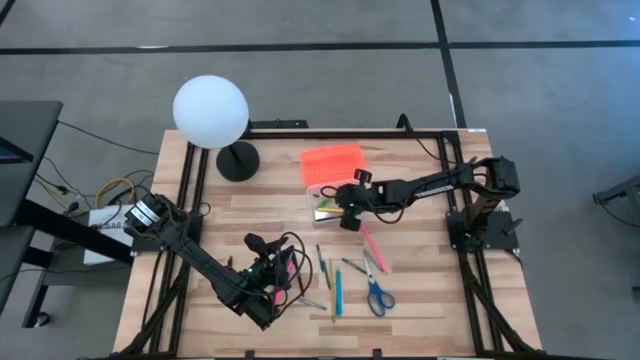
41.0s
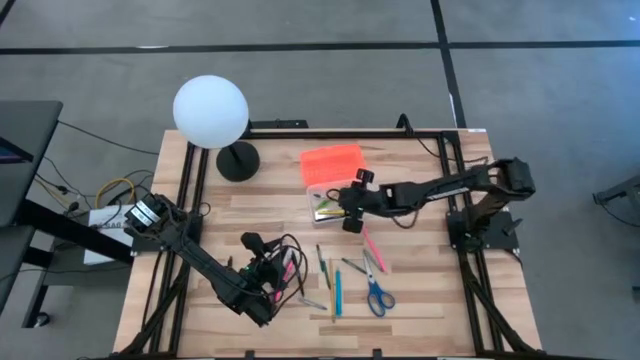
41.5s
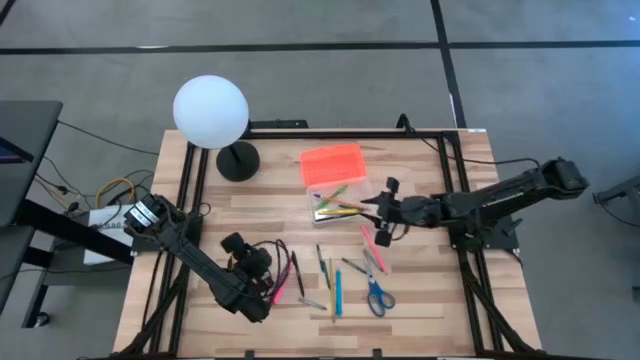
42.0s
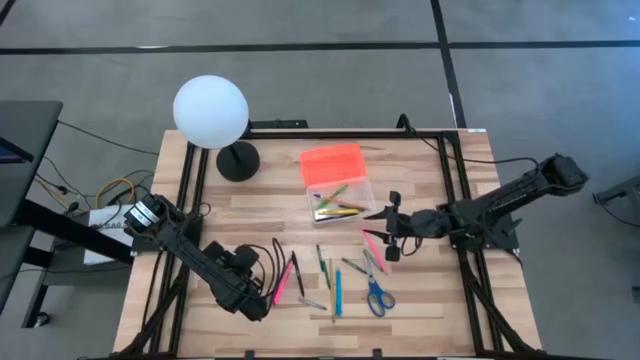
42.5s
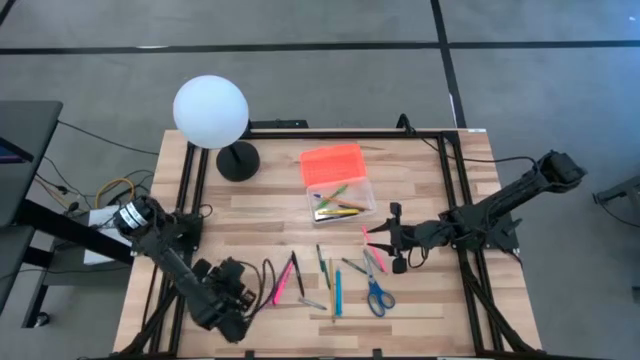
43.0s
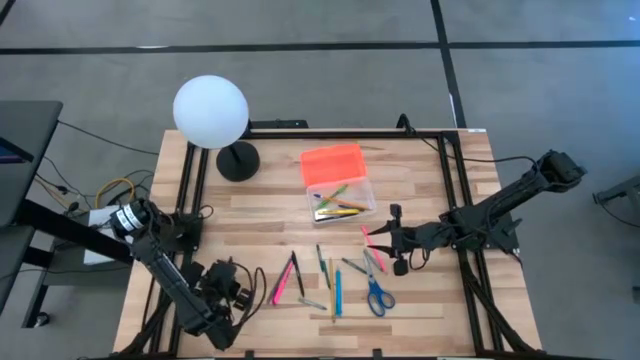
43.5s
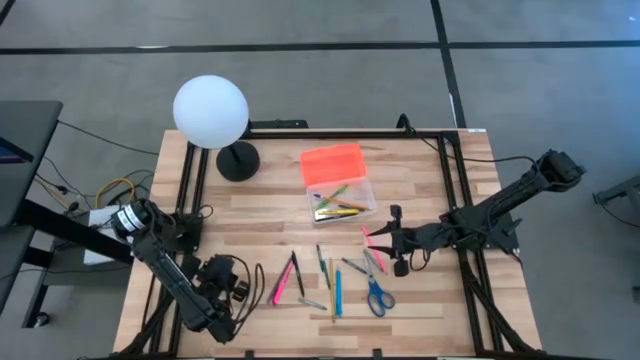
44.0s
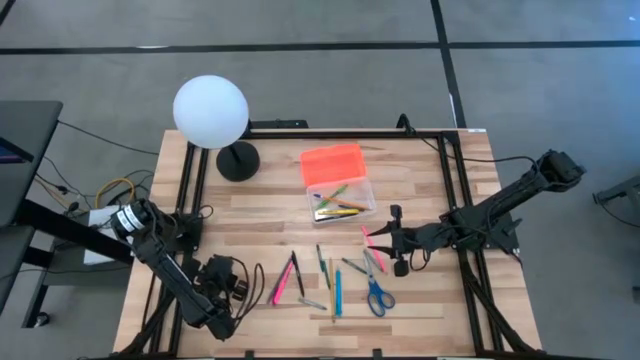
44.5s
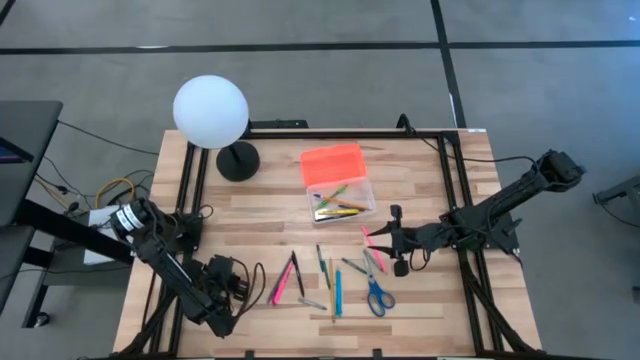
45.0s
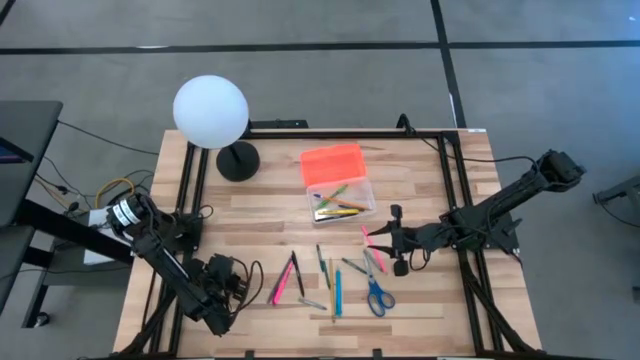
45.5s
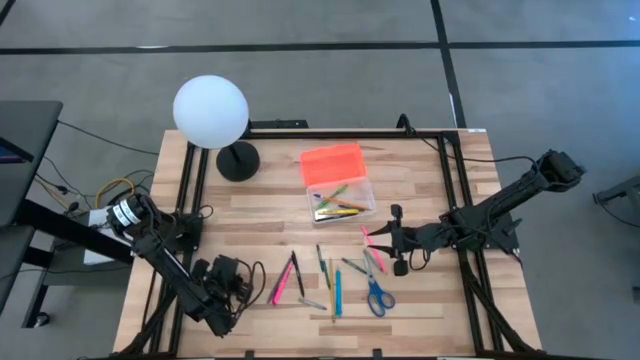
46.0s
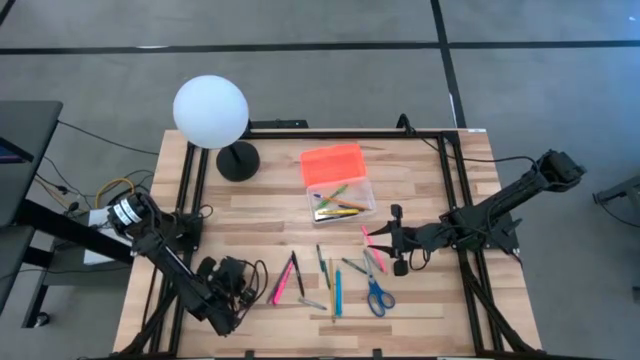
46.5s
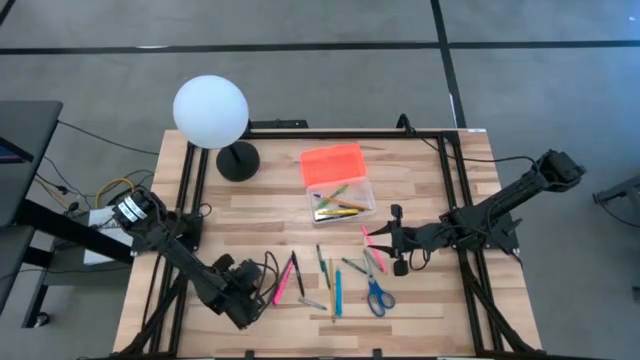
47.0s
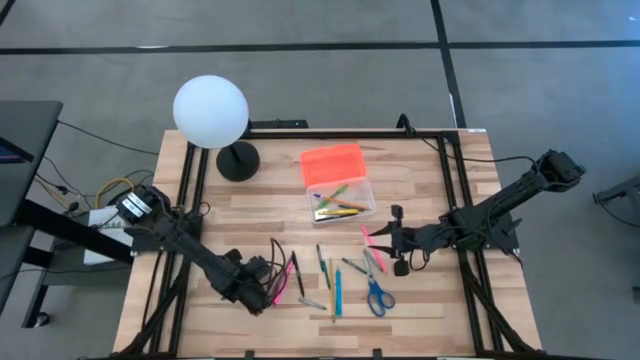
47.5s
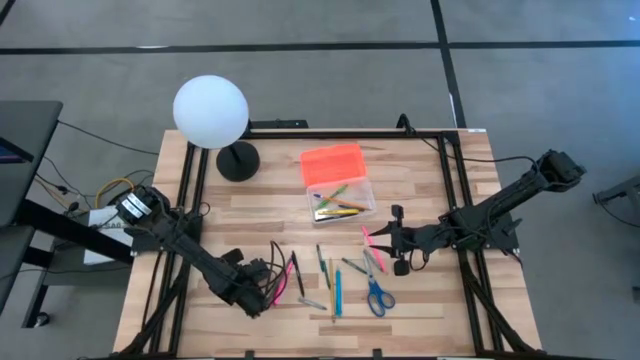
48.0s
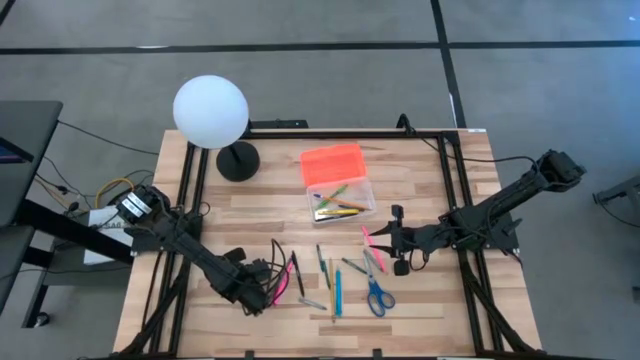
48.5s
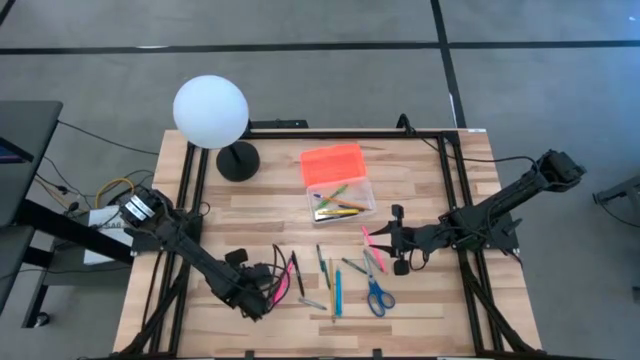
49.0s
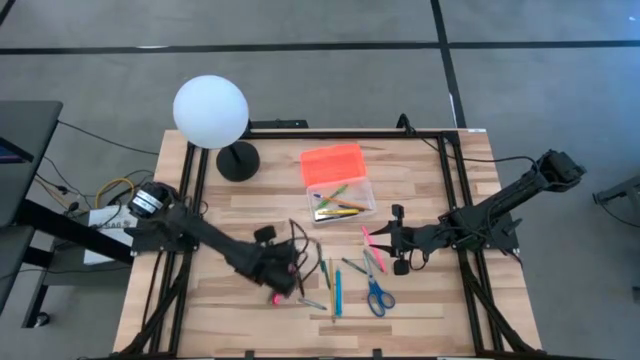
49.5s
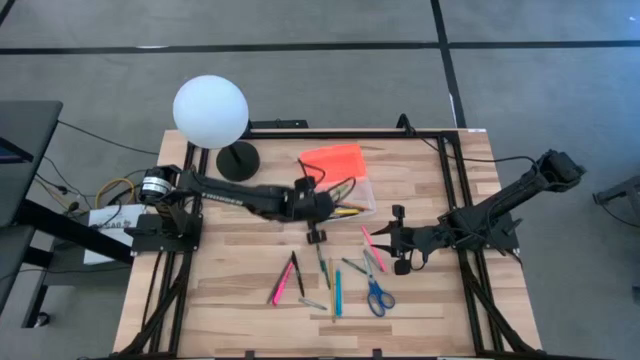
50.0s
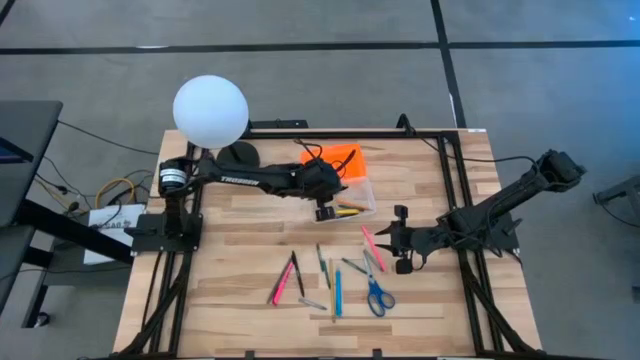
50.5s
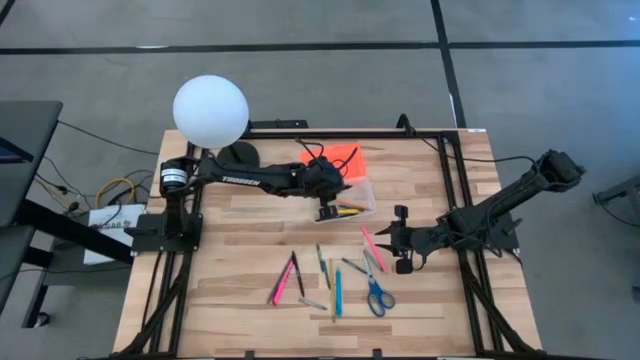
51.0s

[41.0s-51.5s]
Task: Pick & place school supplies into a supply box
Put the black pen into the orange supply box

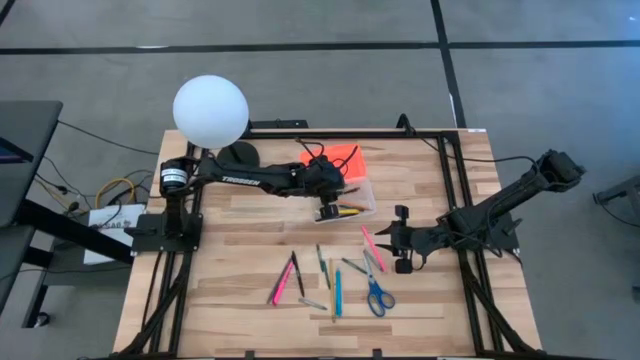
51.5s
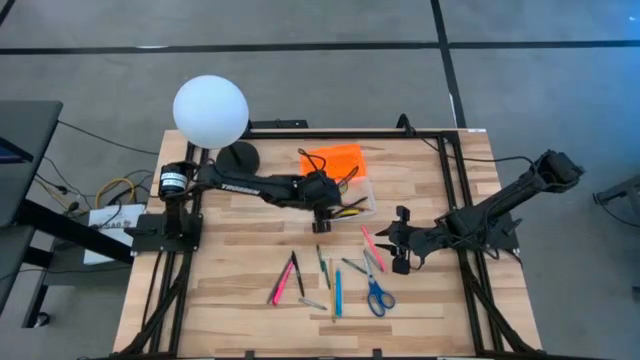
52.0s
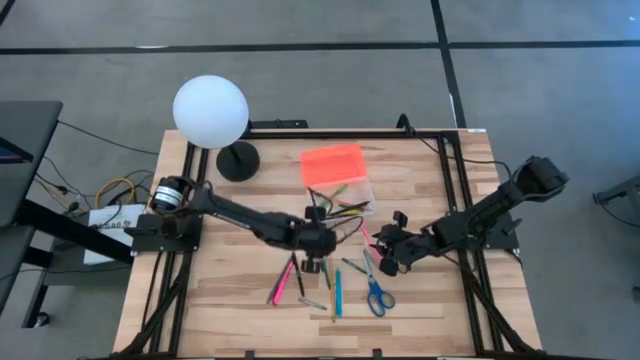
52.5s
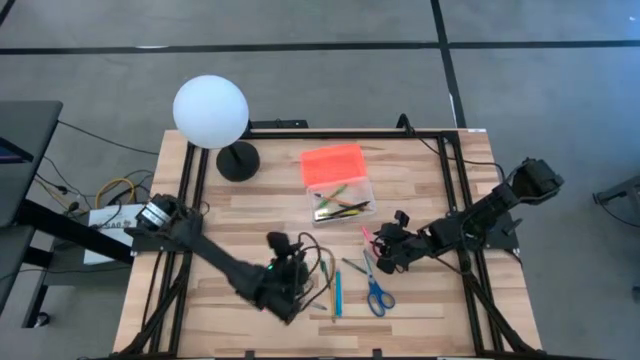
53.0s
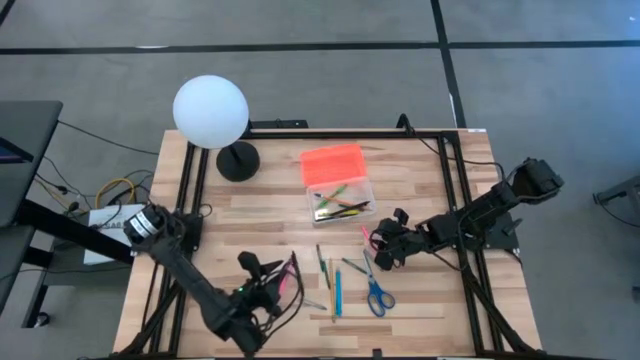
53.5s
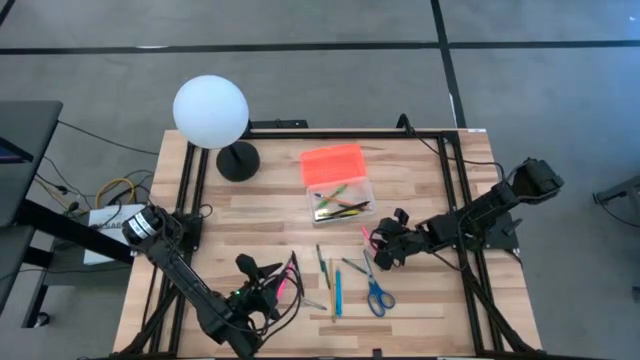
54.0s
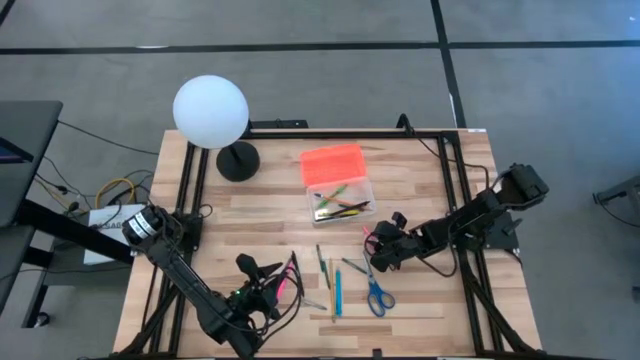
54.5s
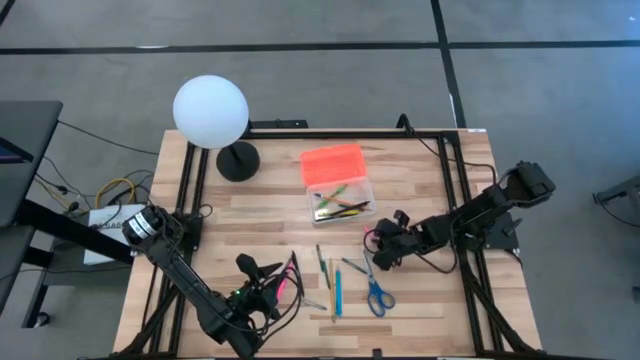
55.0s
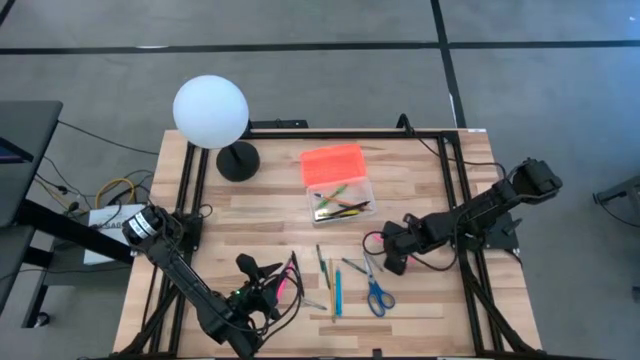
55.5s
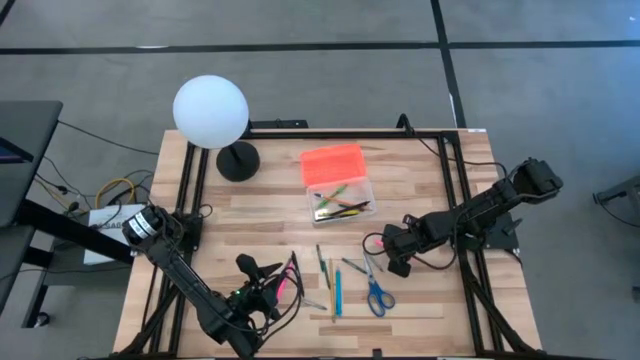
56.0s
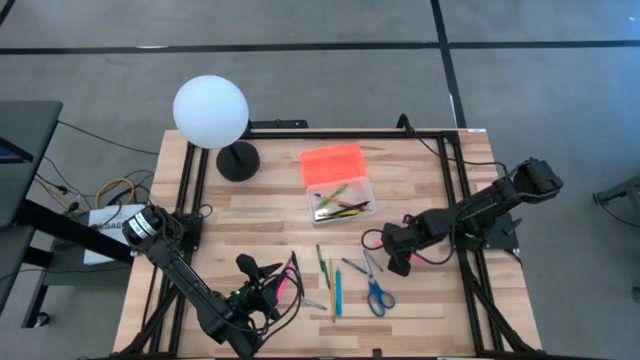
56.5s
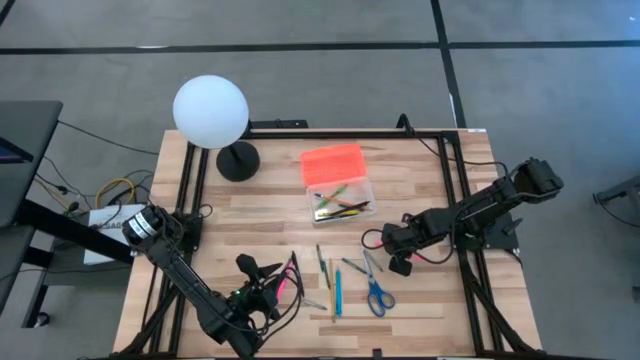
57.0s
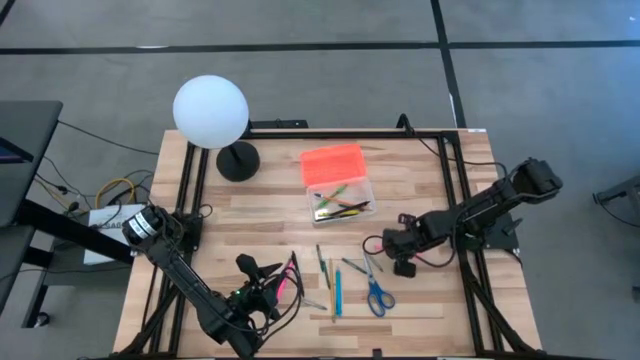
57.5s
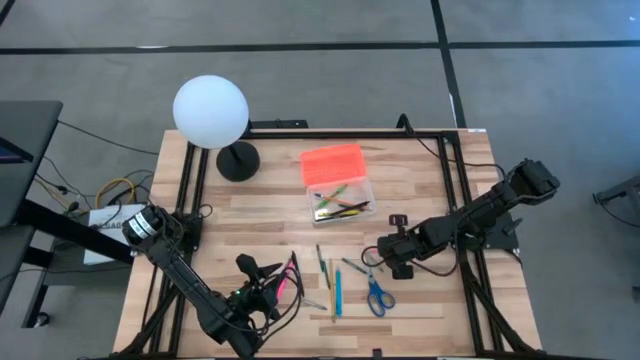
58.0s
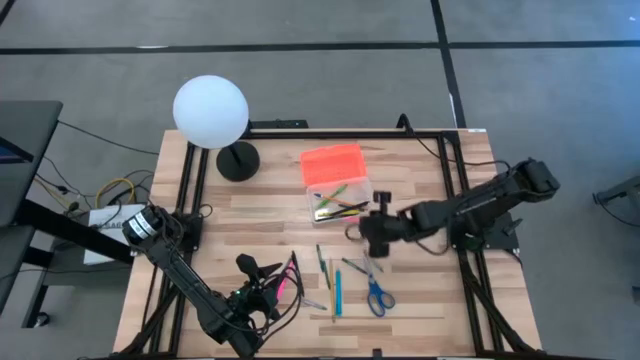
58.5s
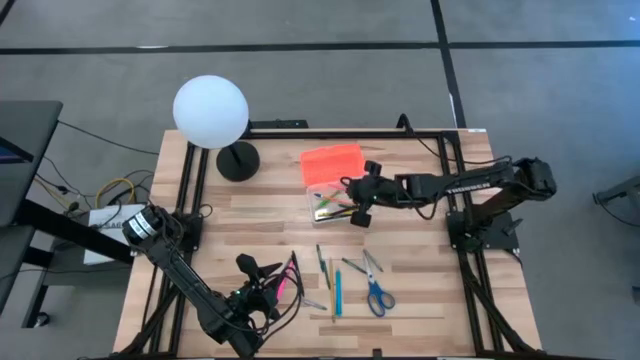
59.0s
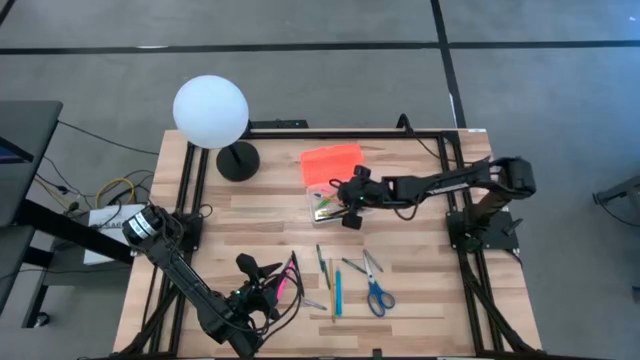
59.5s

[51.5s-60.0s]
Put the pink pencil into the orange supply box

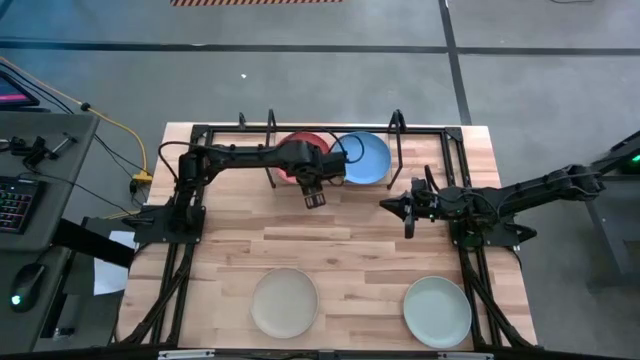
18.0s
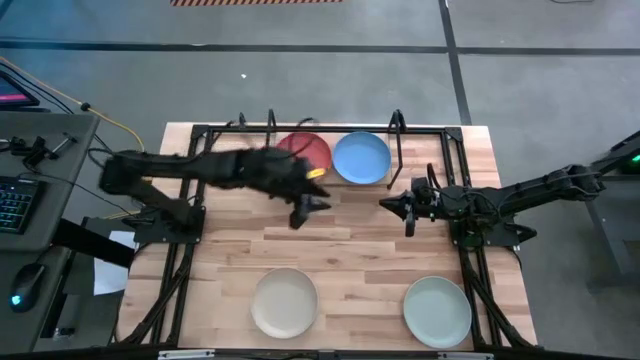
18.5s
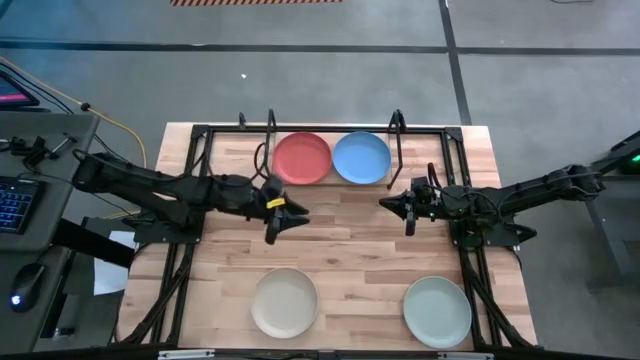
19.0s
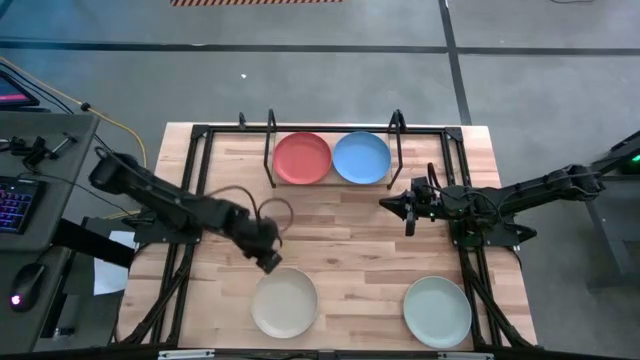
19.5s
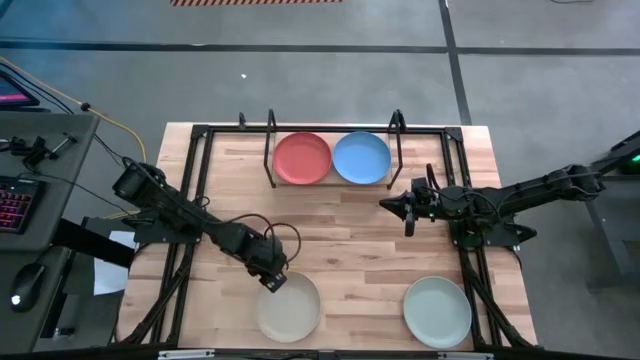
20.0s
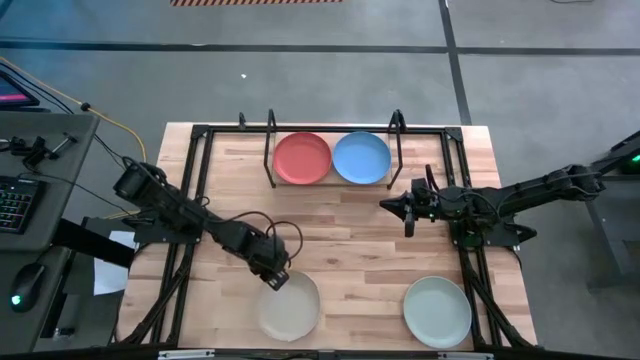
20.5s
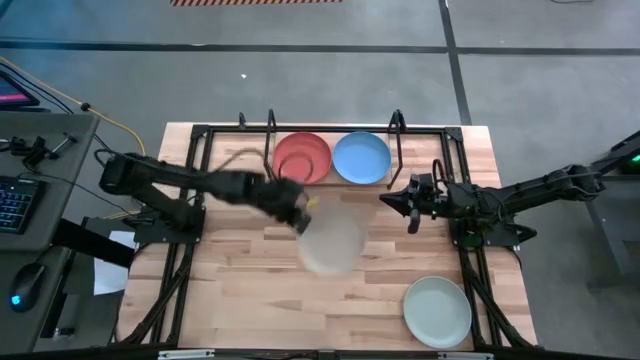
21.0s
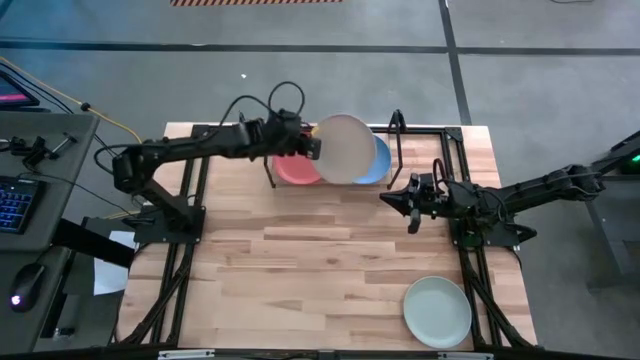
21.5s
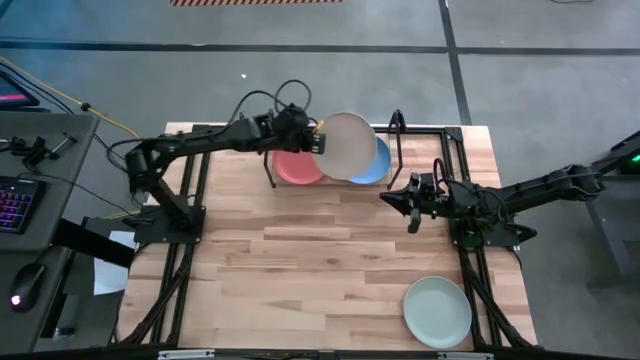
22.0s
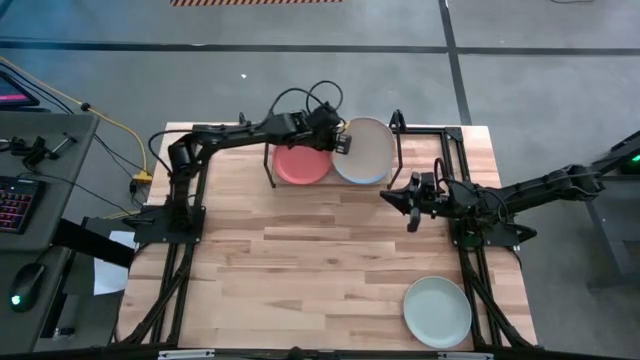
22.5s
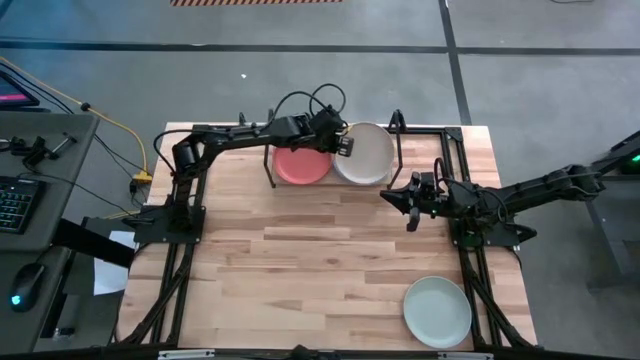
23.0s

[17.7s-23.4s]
Task: Place and stack plates onto a shelf
Stack the gray plate on top of the blue plate
